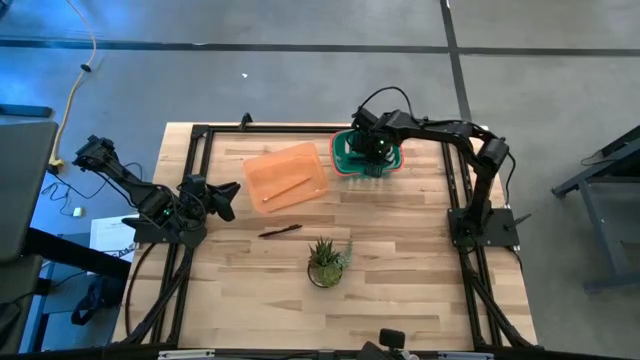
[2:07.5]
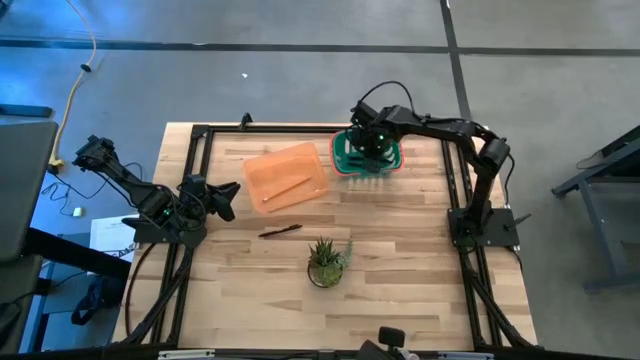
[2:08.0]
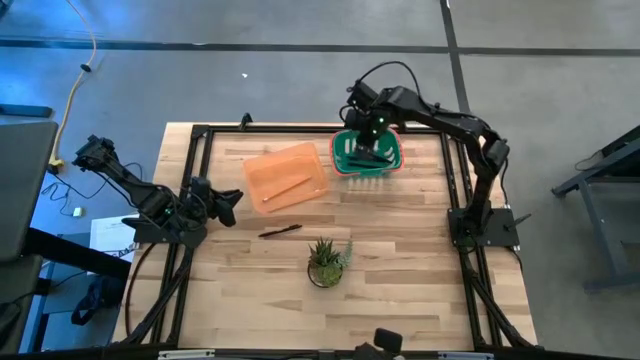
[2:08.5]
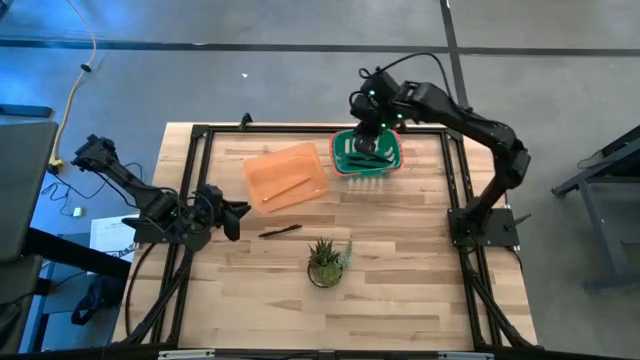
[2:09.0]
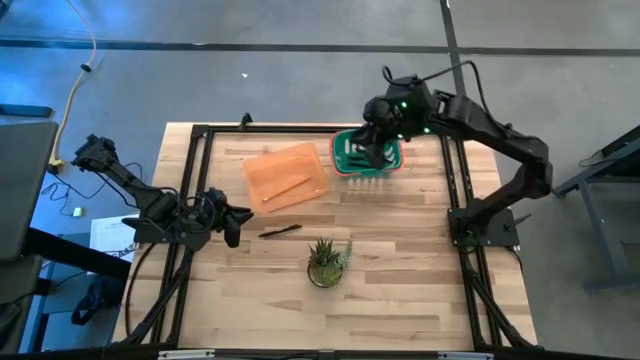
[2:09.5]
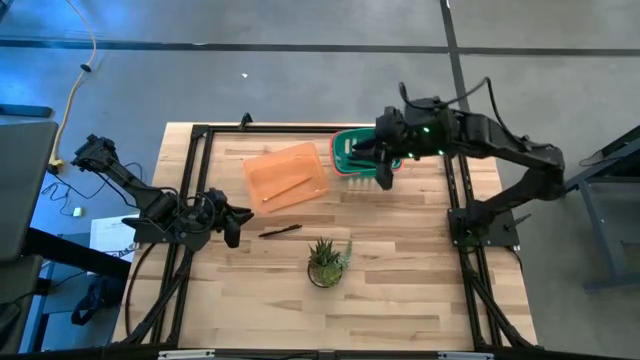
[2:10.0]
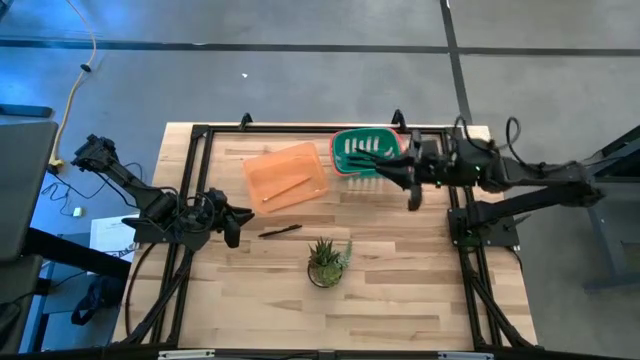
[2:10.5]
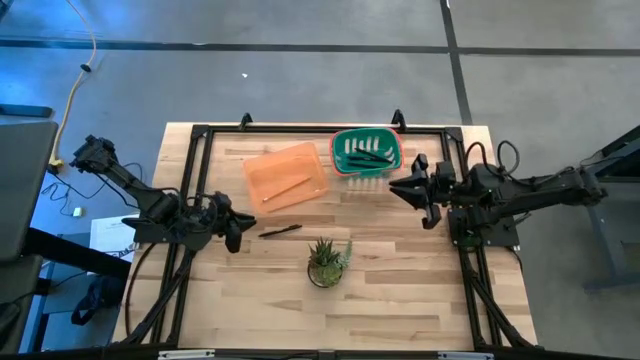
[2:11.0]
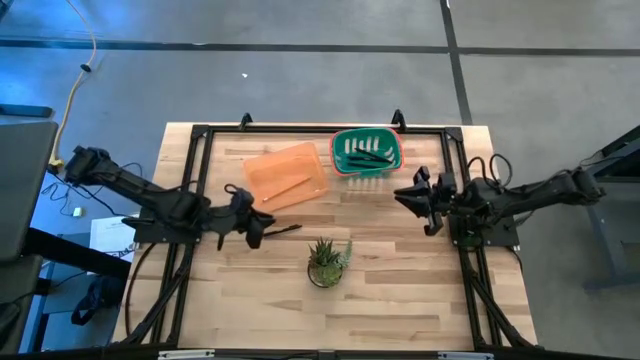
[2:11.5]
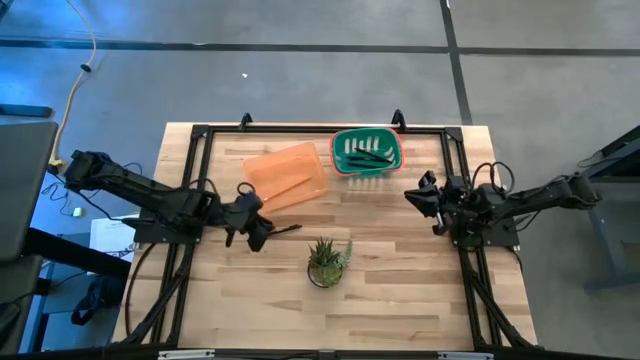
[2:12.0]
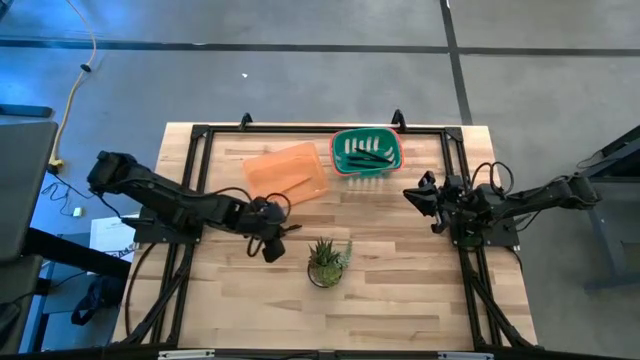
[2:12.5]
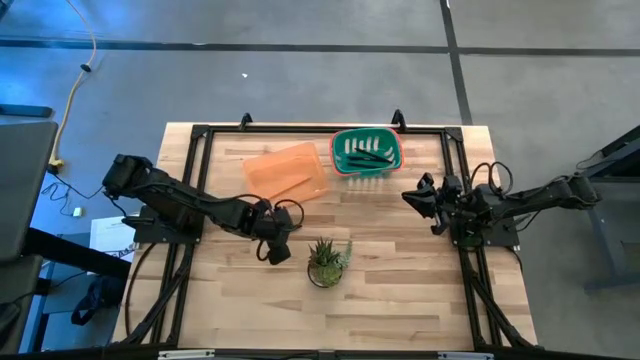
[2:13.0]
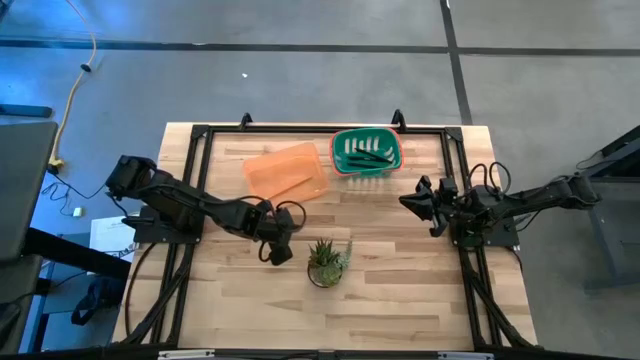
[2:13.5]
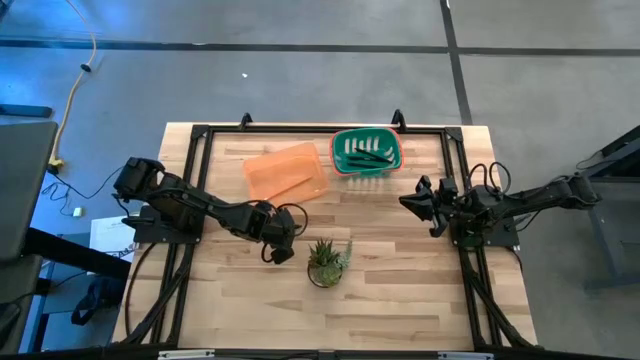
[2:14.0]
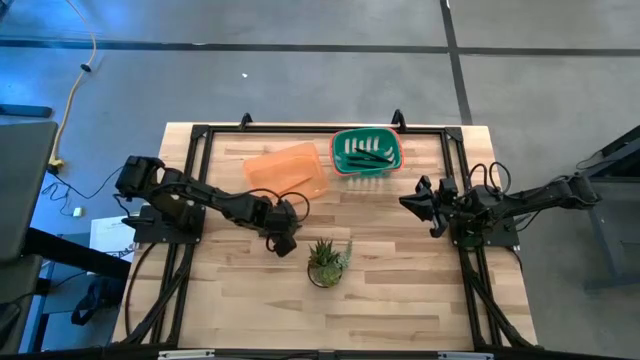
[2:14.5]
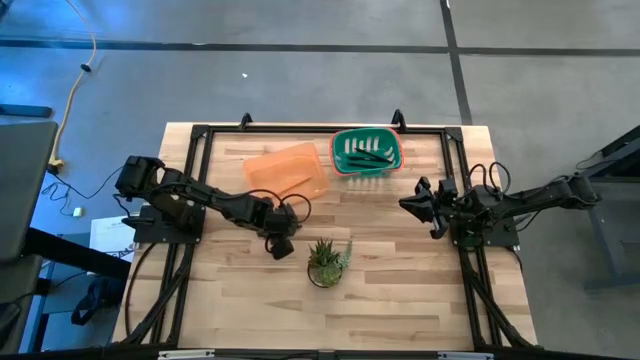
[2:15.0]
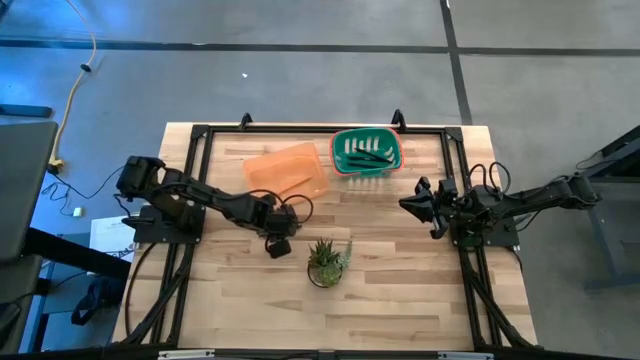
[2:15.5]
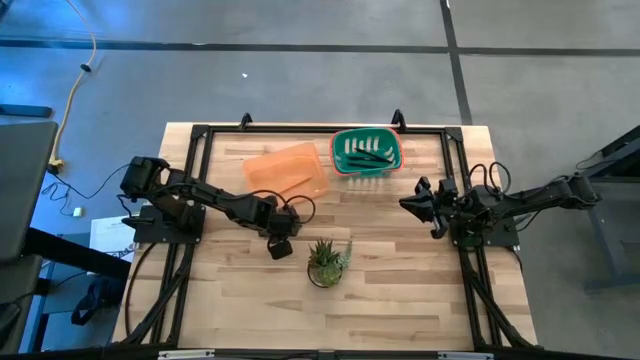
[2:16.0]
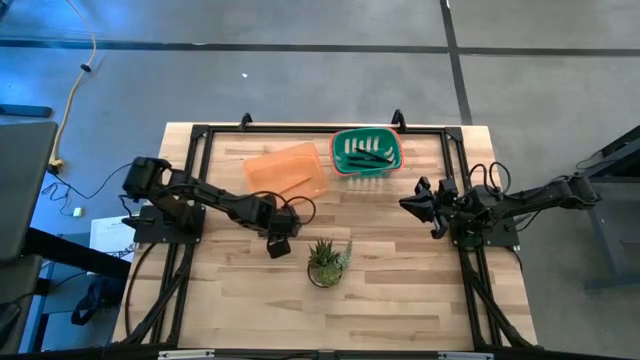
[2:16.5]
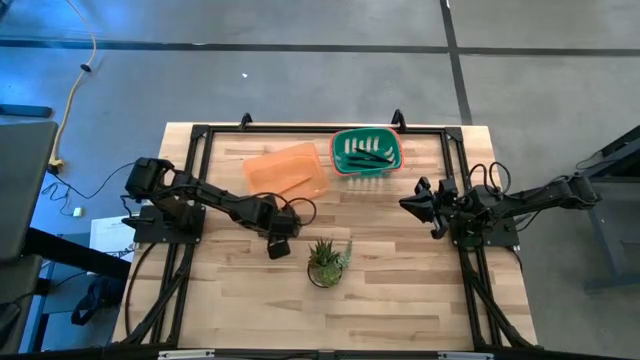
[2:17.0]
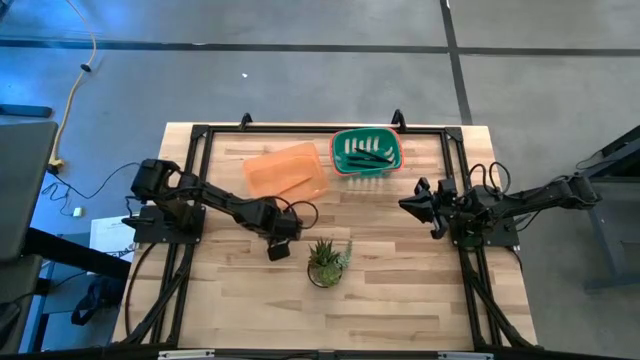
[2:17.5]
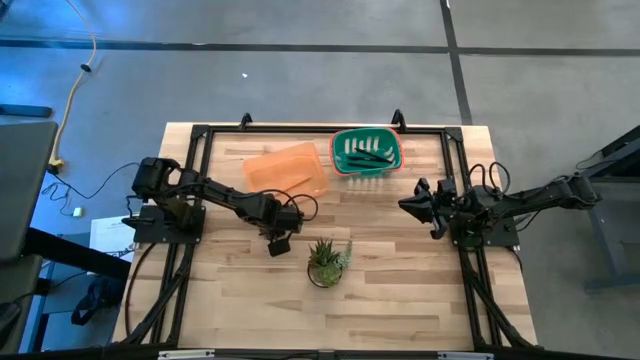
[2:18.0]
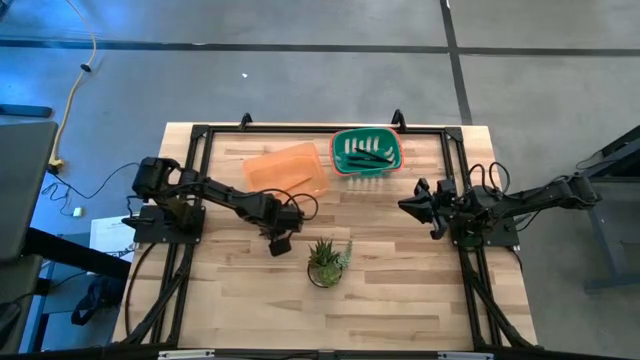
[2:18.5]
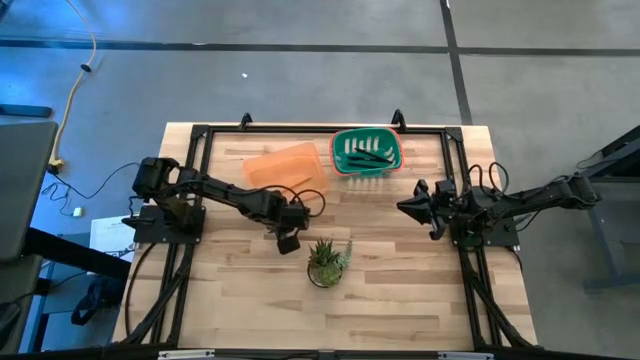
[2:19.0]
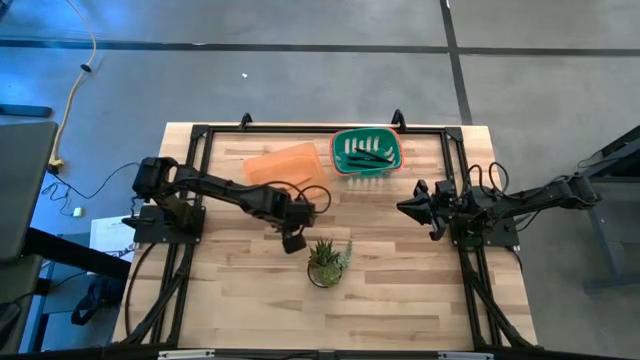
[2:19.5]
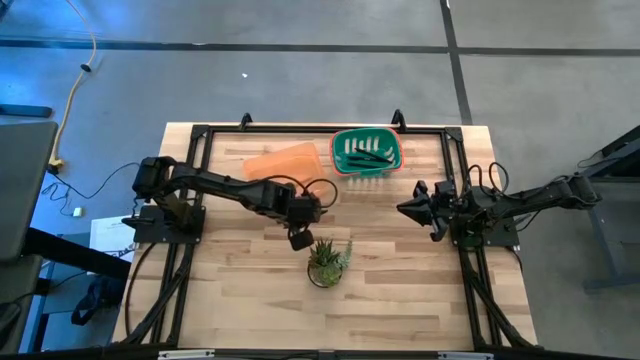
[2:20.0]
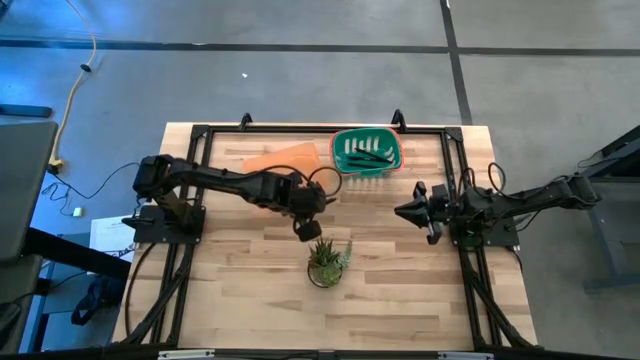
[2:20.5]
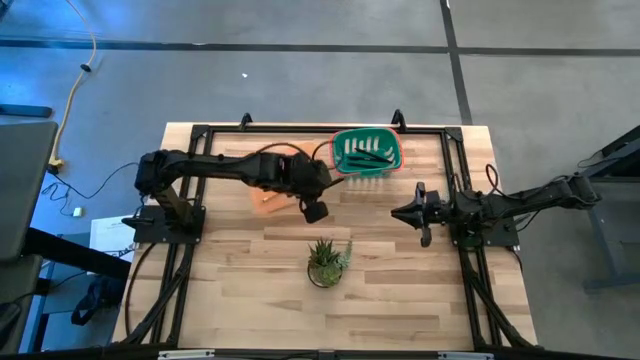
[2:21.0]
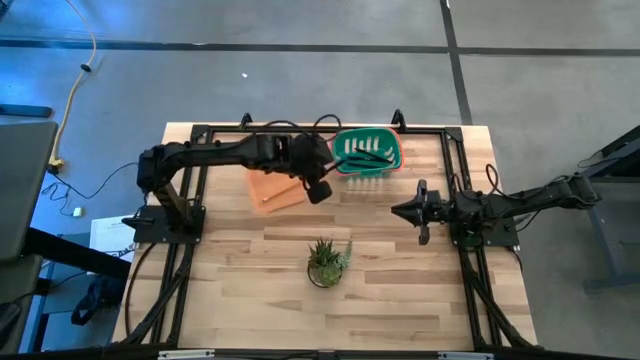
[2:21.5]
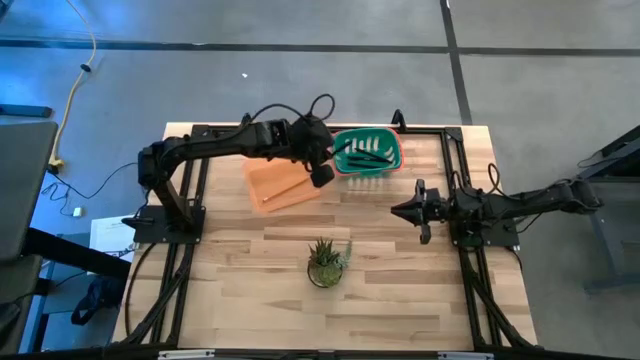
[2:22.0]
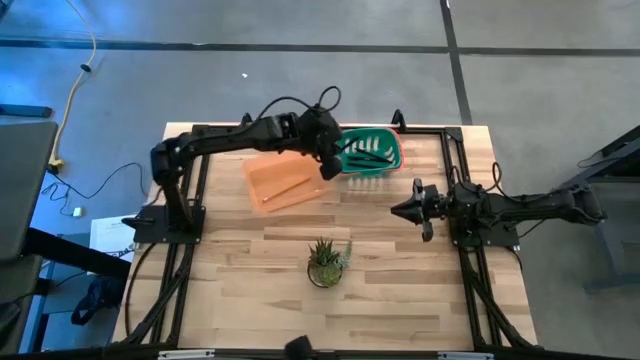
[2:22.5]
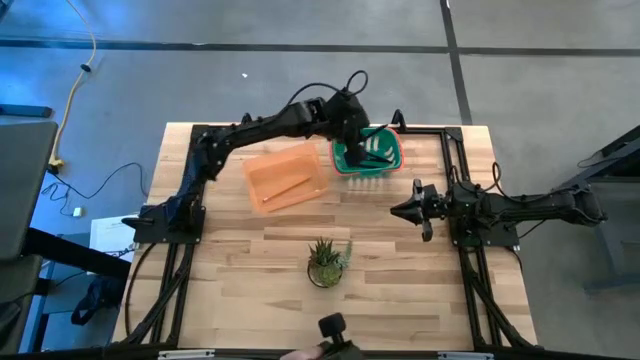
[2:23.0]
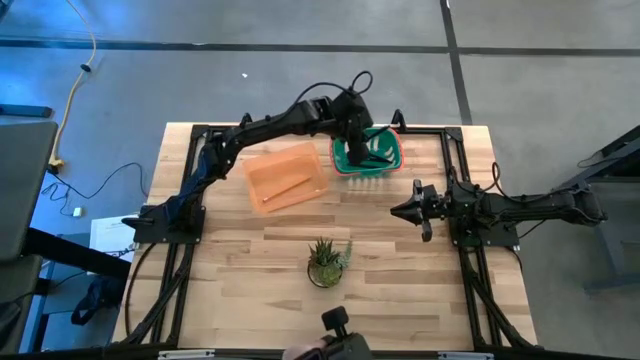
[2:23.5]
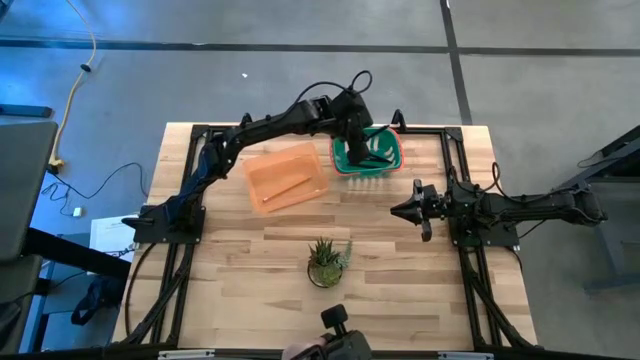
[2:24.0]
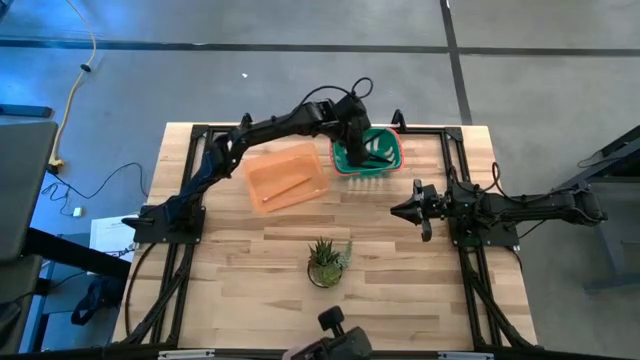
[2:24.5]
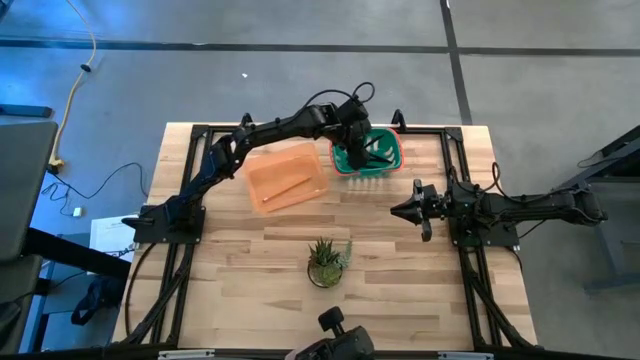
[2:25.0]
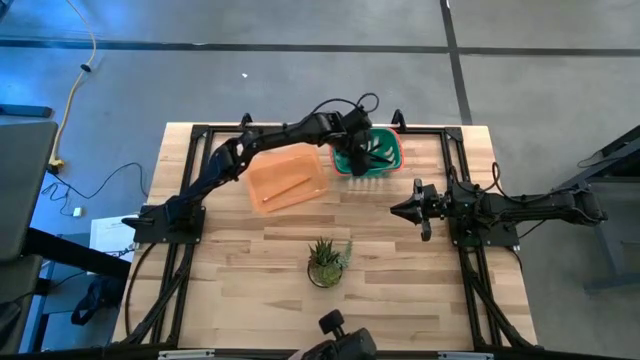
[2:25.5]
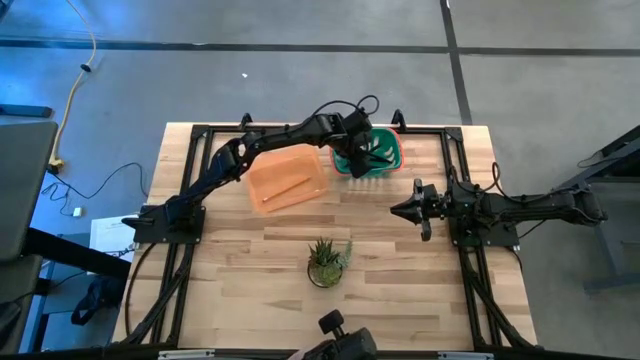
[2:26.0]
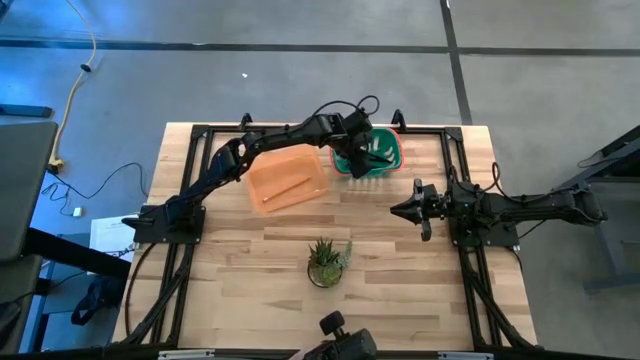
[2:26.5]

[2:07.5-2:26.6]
Task: Sort pens & pencils
Put the black pen into the green basket

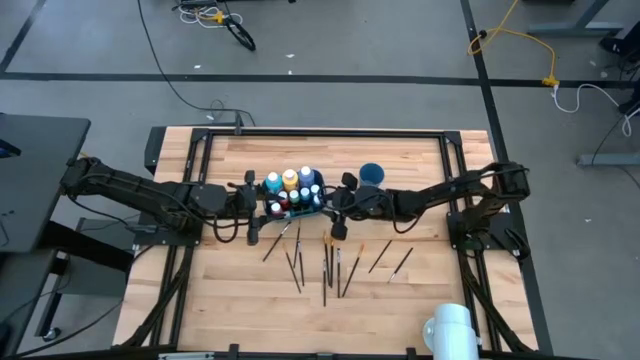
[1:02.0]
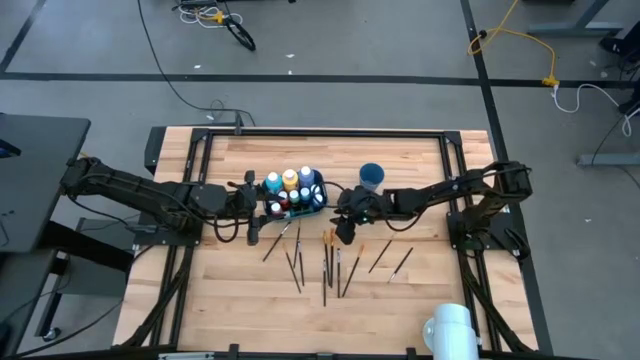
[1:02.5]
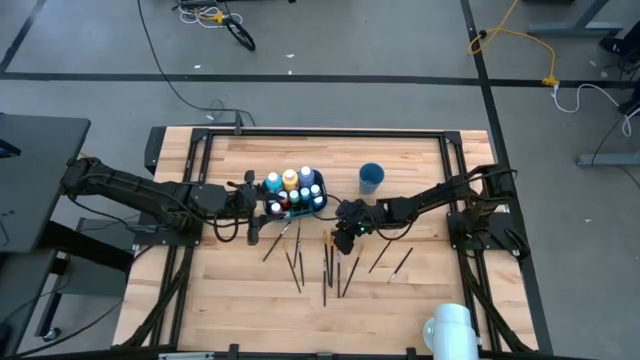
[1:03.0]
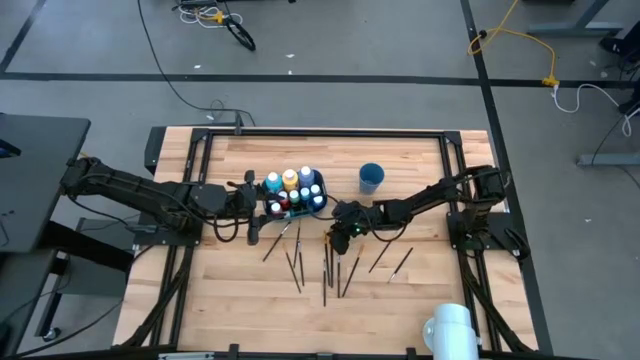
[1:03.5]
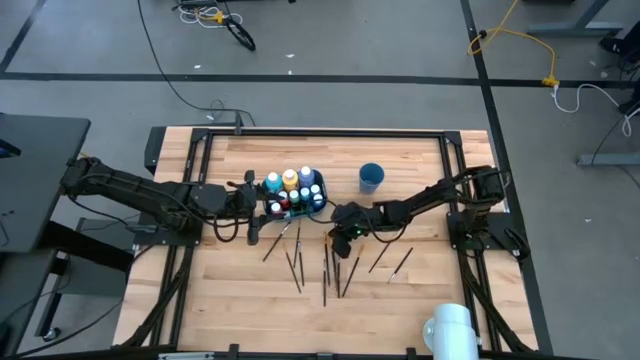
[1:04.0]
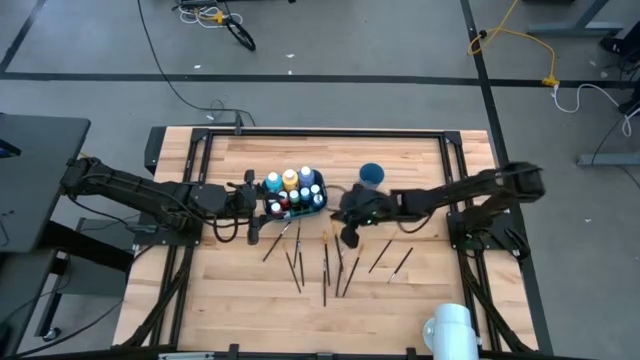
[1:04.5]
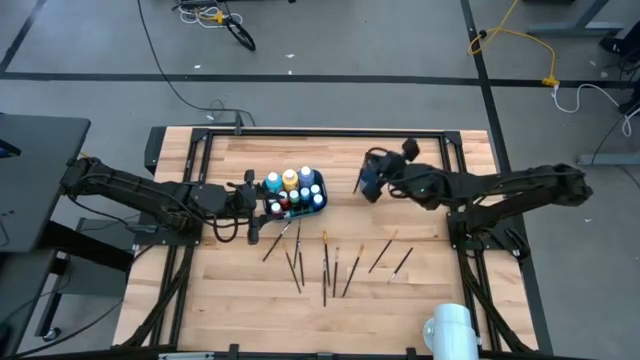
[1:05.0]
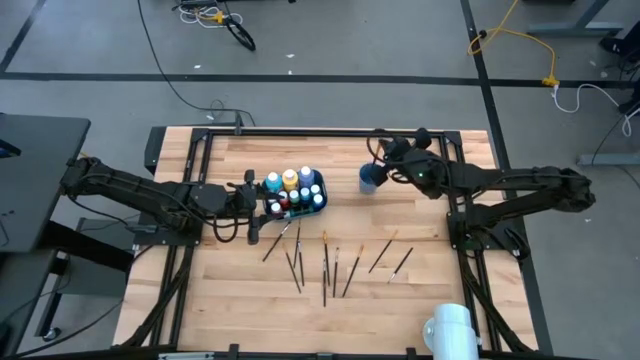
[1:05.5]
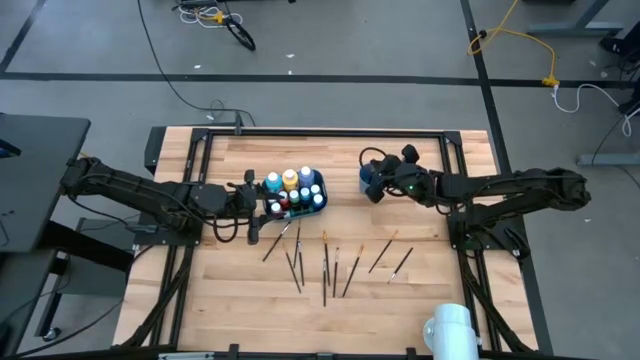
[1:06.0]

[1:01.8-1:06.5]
Task: Pick & Place Paint Supplies
Put the orange paint brush into the blue cup
